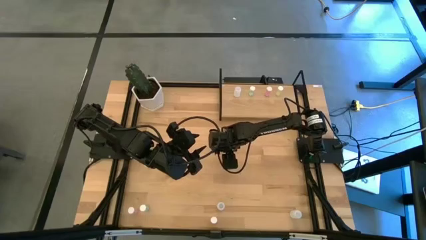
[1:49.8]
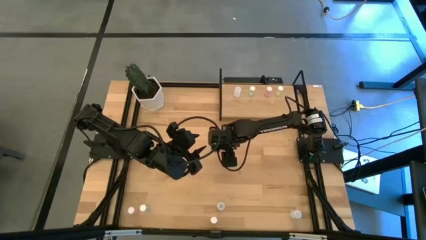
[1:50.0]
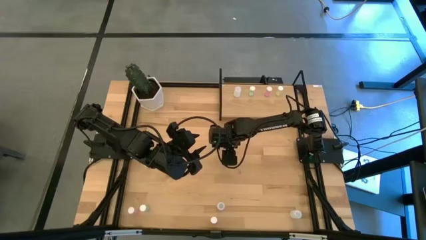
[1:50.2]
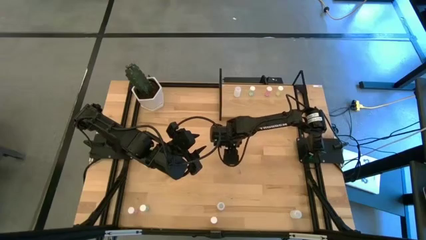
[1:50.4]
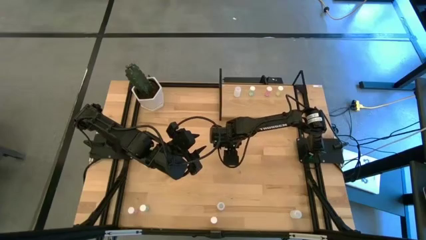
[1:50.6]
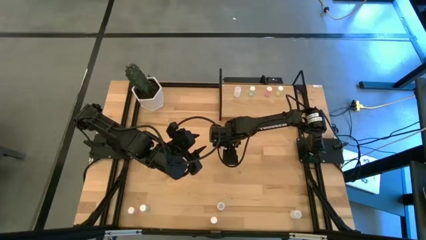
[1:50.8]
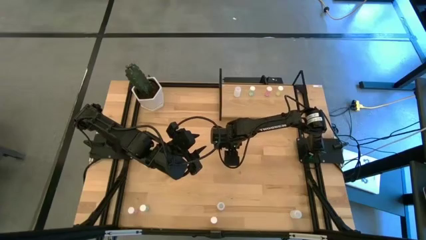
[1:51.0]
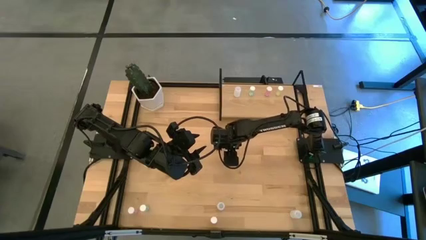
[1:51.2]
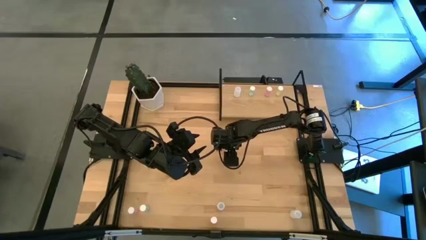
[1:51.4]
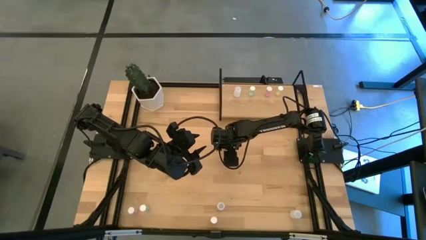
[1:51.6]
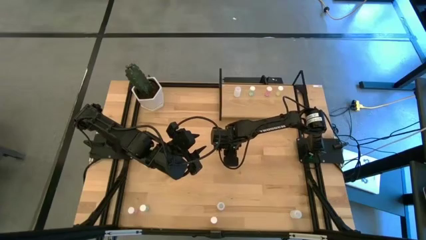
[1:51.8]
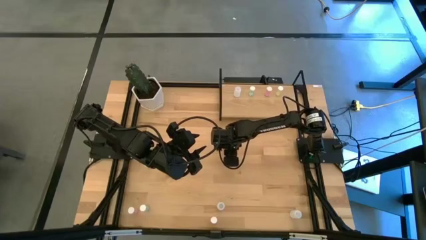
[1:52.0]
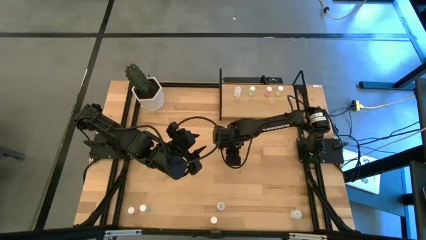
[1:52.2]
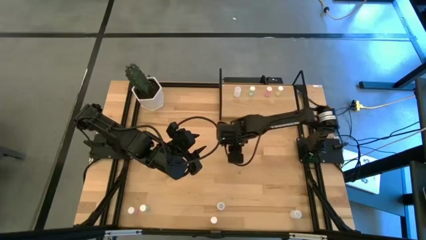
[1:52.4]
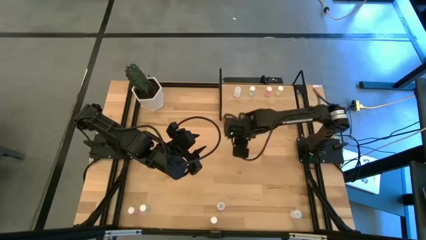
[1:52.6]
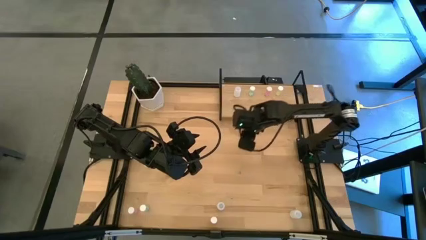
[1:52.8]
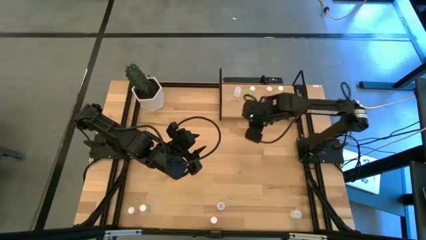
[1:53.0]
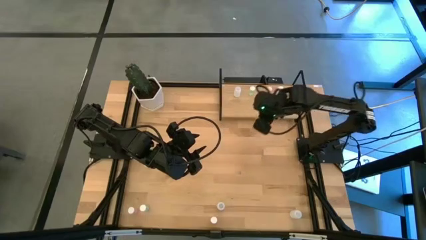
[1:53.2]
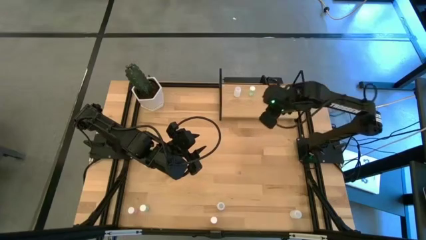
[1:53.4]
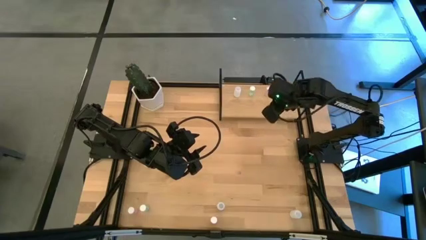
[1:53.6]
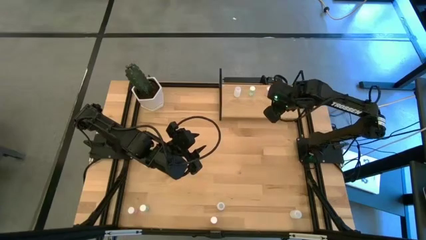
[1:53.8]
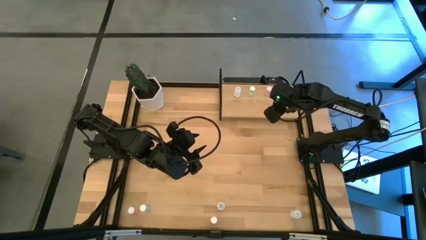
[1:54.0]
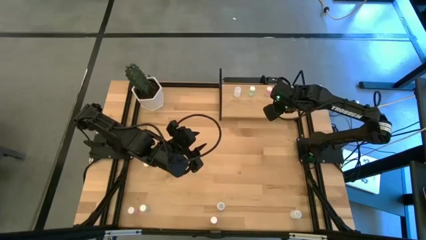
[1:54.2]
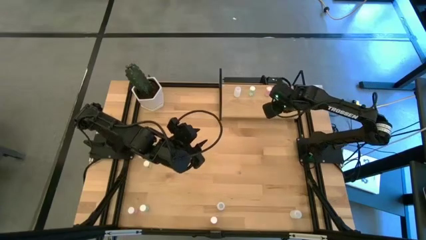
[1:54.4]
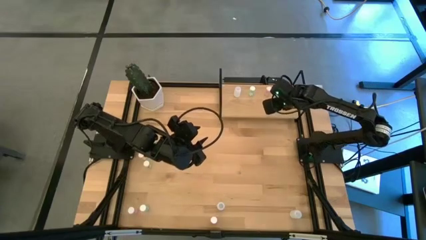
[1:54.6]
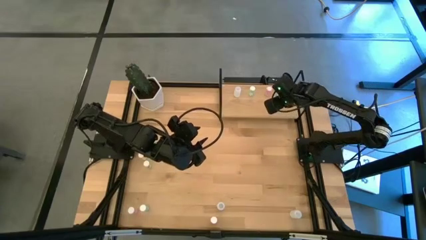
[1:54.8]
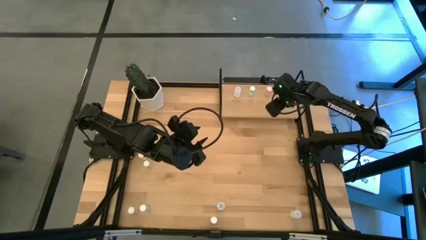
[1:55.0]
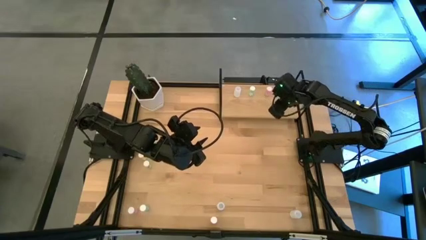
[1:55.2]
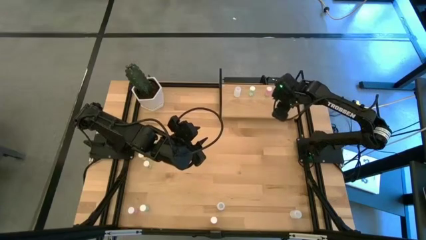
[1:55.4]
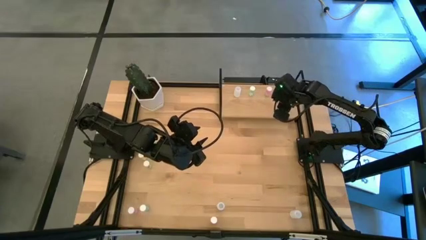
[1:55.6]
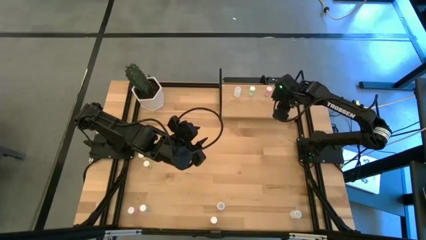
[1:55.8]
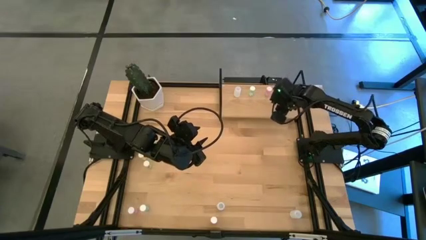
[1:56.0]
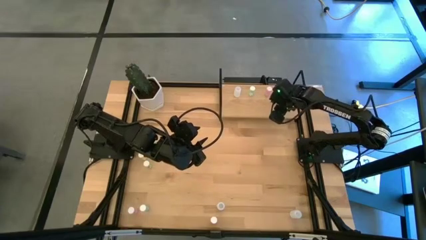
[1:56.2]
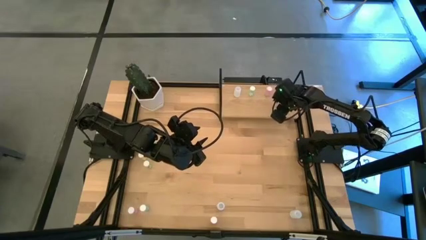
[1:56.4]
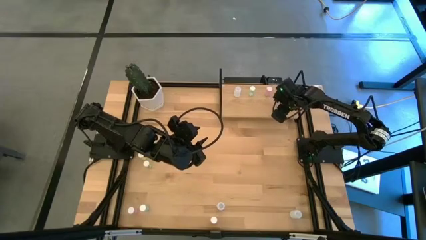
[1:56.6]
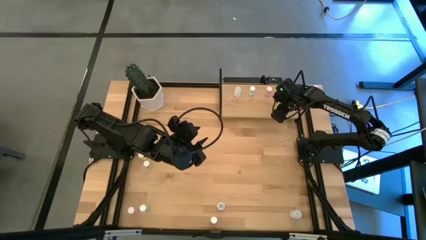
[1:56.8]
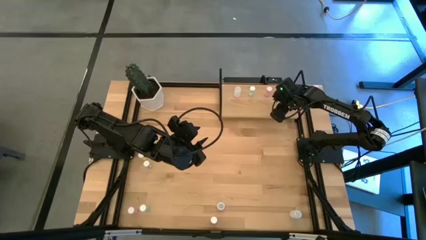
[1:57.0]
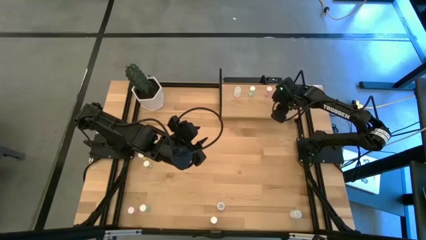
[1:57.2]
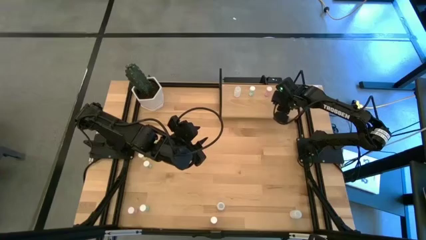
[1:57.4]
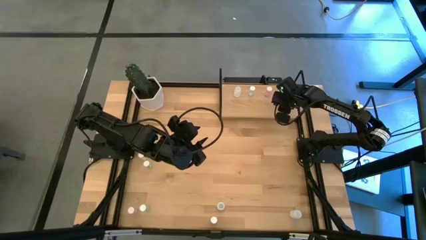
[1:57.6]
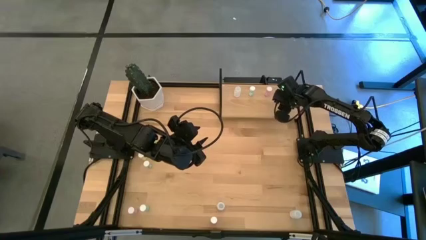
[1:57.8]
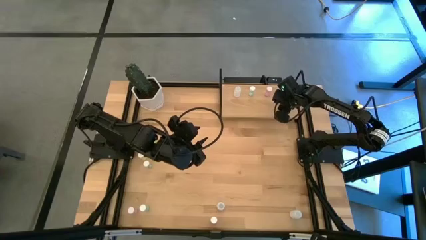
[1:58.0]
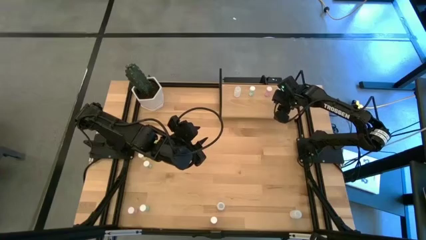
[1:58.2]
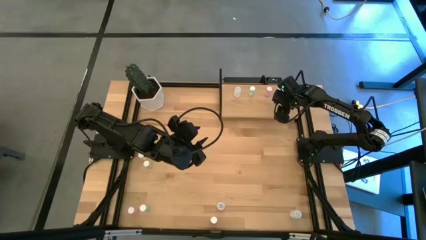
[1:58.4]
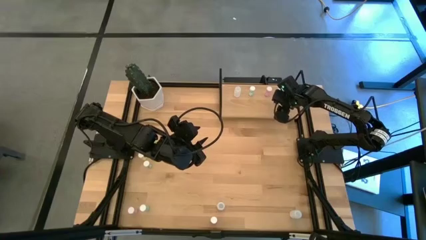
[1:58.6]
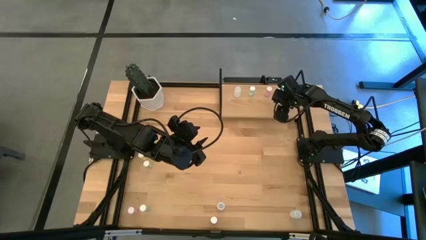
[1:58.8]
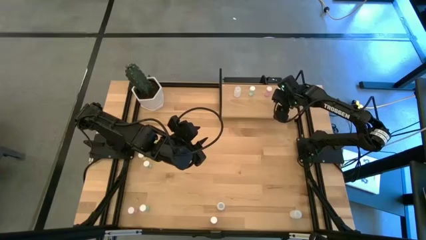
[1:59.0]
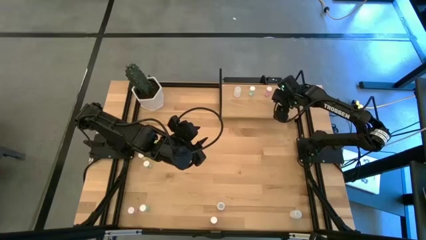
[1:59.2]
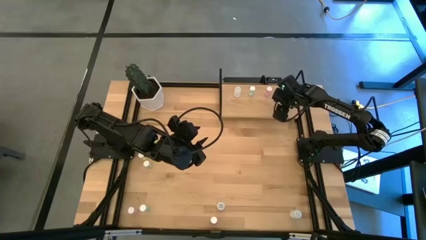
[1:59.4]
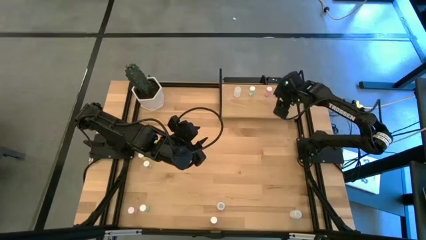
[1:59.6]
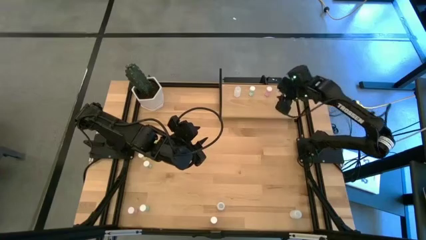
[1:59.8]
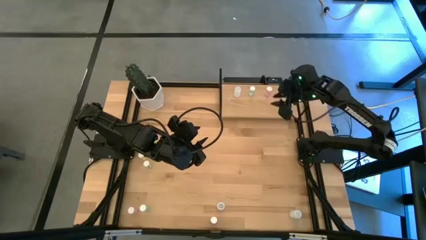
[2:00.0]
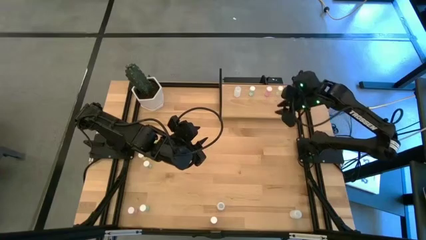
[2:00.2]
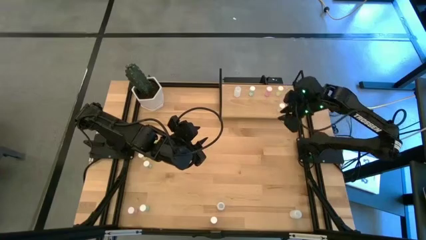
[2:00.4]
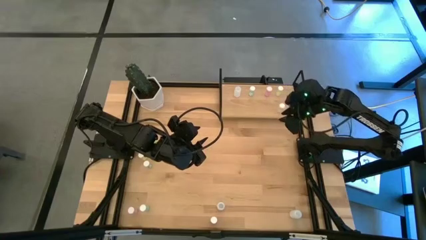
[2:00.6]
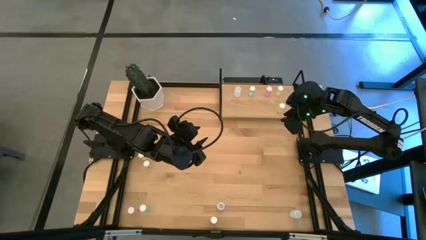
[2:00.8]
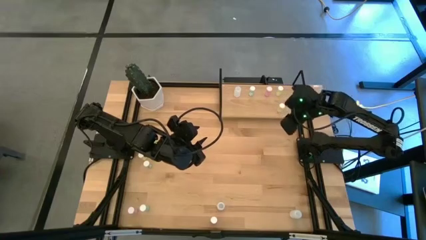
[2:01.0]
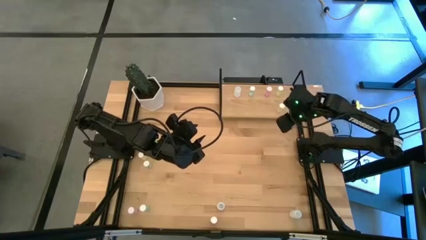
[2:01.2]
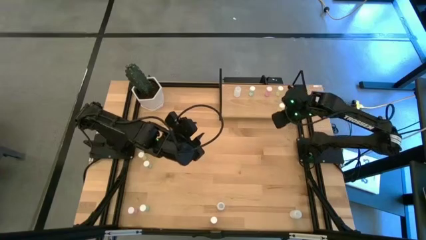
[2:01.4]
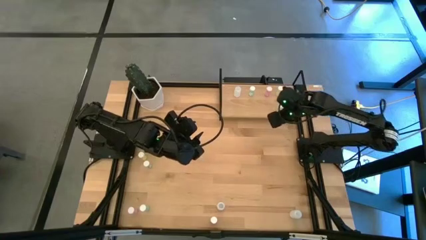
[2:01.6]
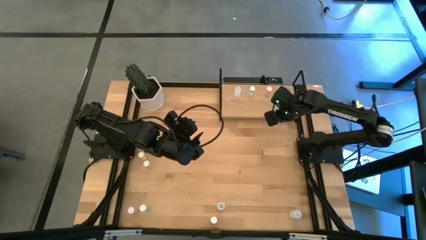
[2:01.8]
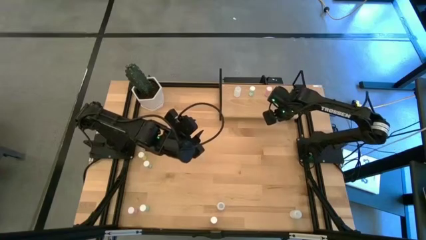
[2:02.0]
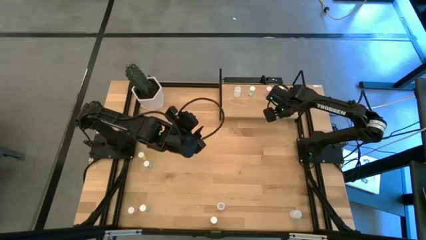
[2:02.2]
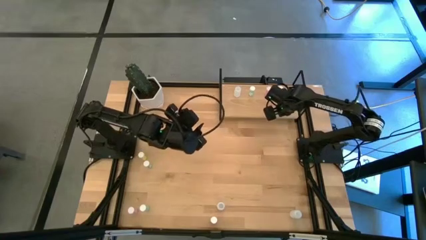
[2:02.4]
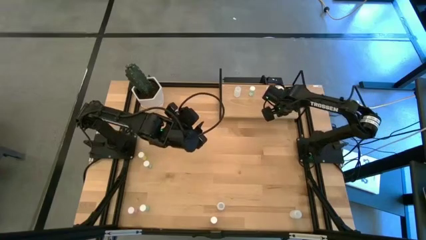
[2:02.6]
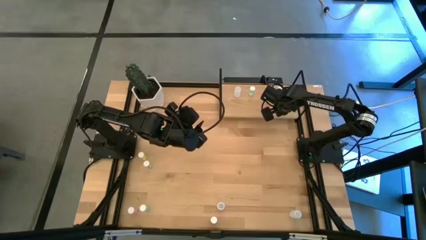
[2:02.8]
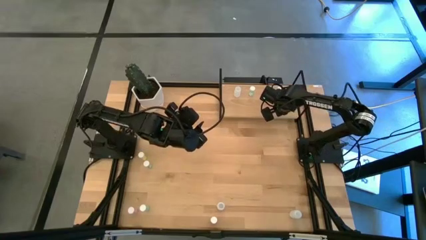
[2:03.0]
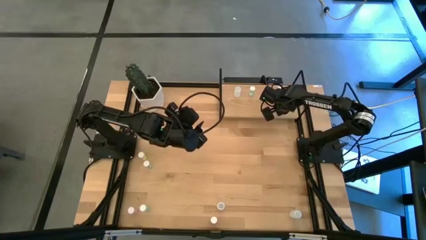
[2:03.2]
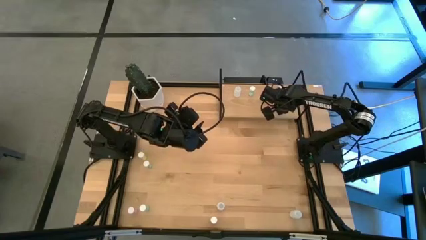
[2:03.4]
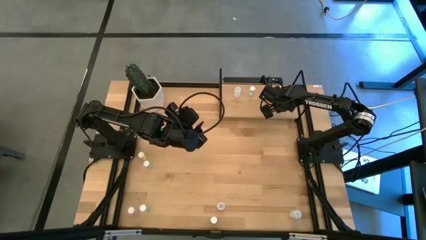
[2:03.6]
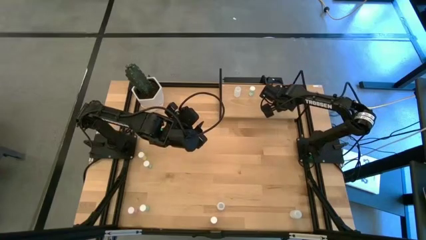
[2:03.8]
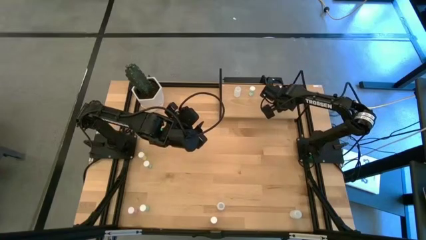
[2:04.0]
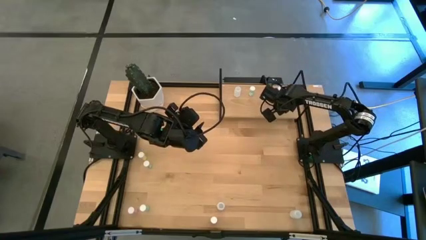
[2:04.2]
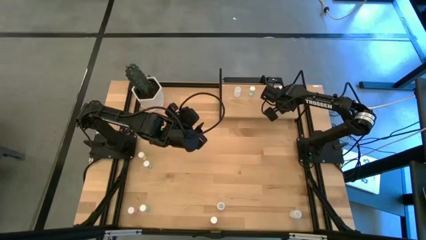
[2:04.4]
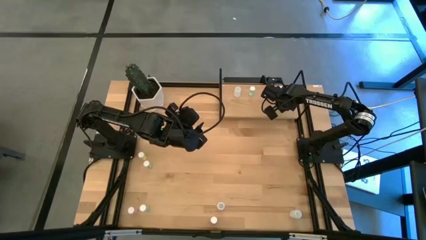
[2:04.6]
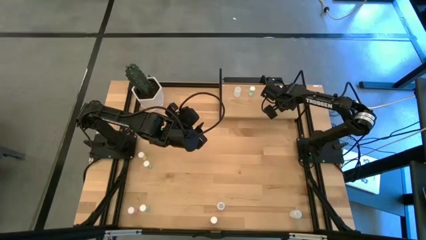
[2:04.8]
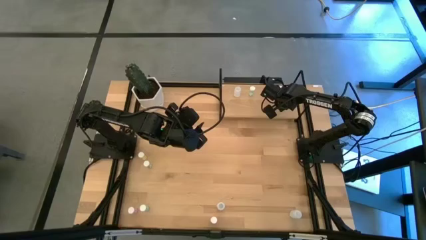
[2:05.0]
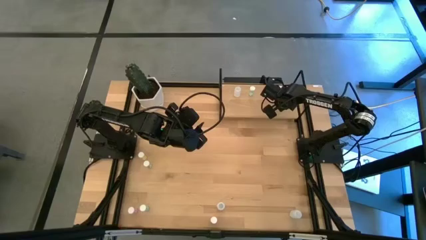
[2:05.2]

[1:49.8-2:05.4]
Task: Pick and place medicine bottles onto shelf by color
Put the top yellow pill bottle on the shelf aligned with the other yellow pill bottle

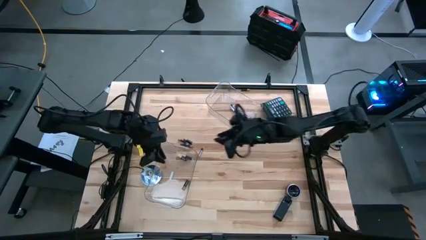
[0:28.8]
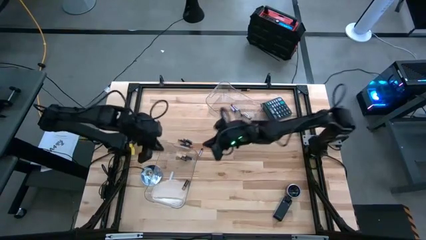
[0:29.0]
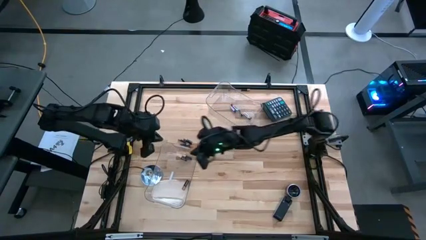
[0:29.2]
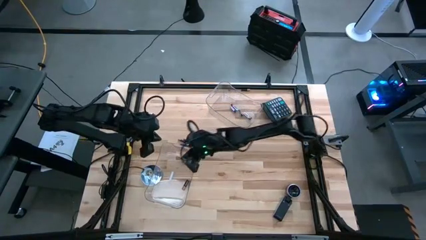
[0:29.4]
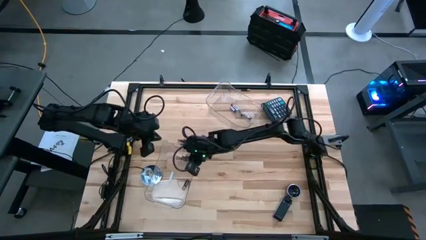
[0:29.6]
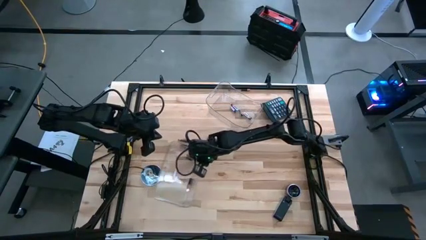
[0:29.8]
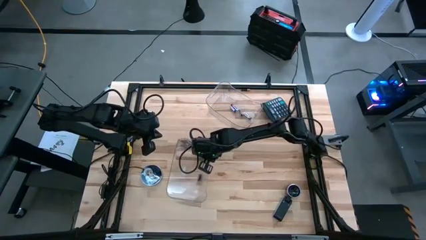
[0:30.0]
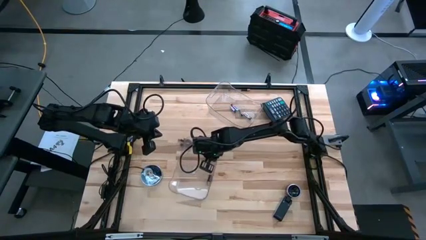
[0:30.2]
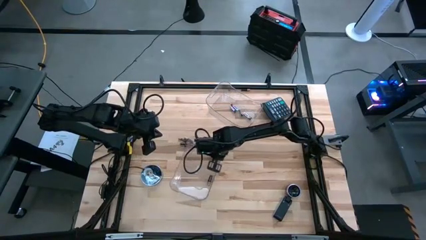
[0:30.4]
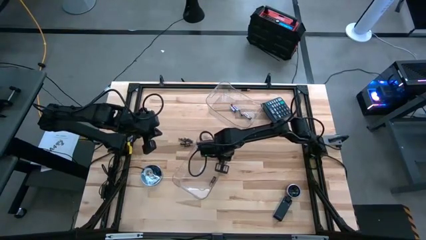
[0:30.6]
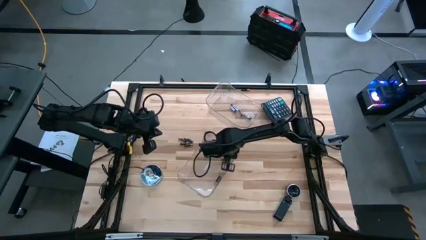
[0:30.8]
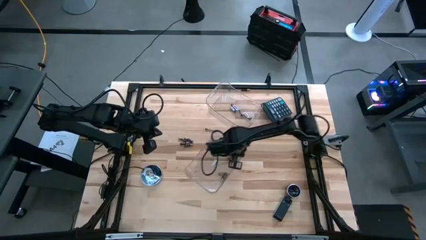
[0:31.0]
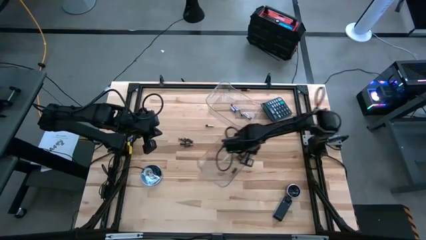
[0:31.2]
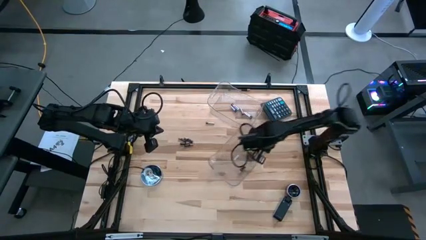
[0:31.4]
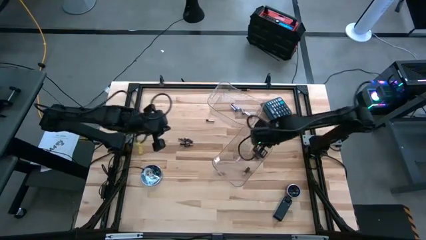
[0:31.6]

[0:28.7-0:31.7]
Task: Sort batteries
Move the bottom transparent bin to the middle right of the table
